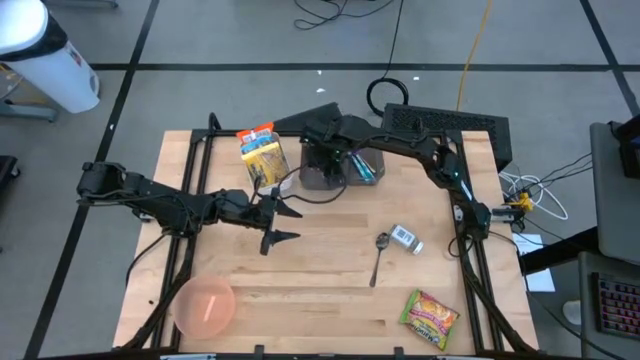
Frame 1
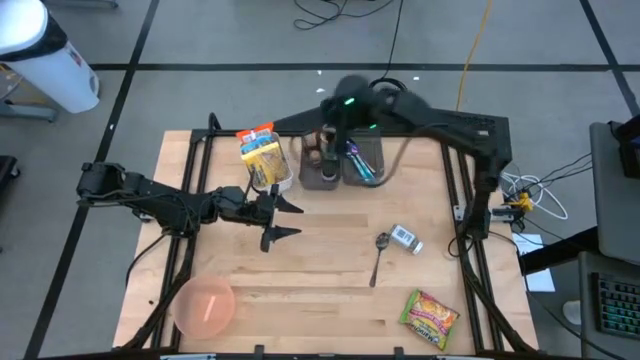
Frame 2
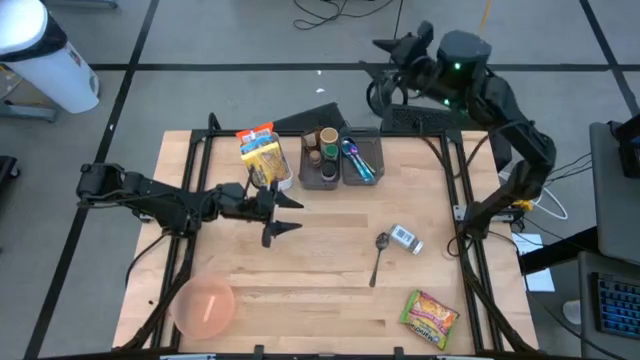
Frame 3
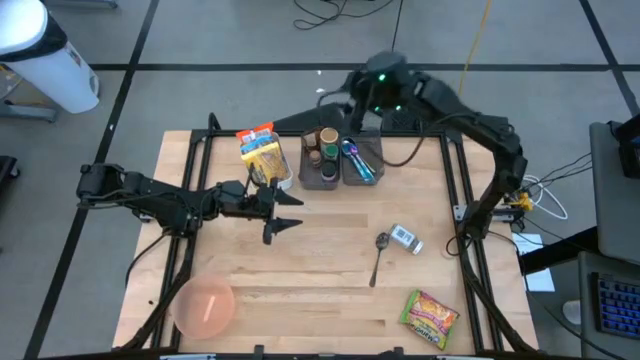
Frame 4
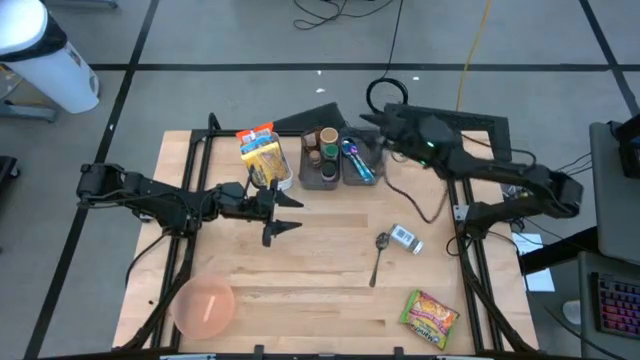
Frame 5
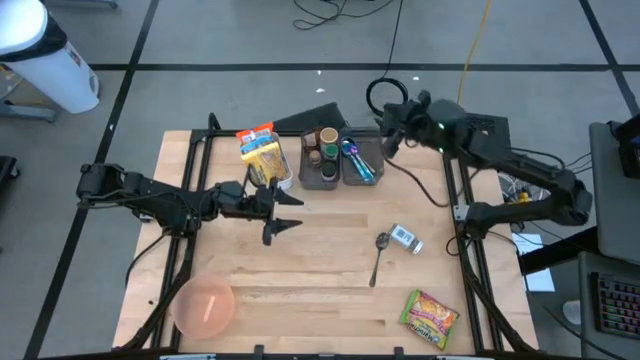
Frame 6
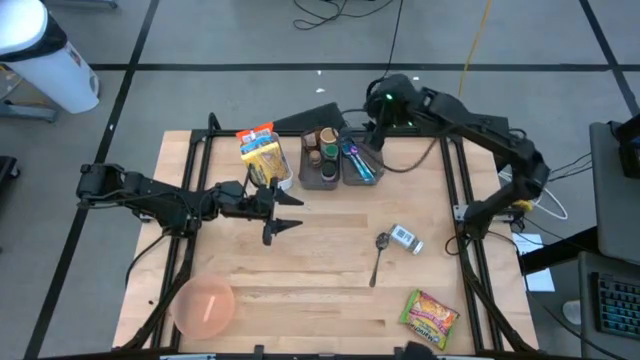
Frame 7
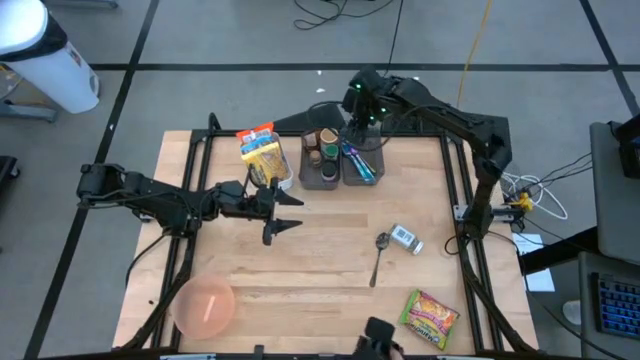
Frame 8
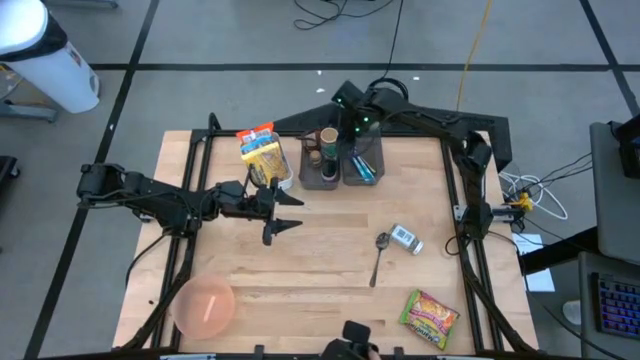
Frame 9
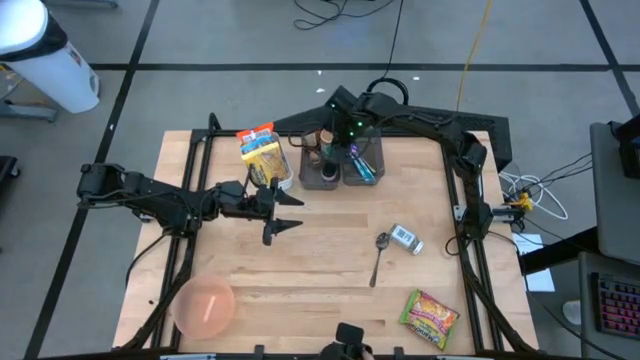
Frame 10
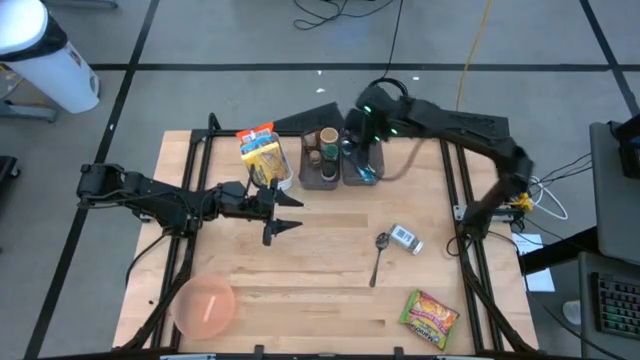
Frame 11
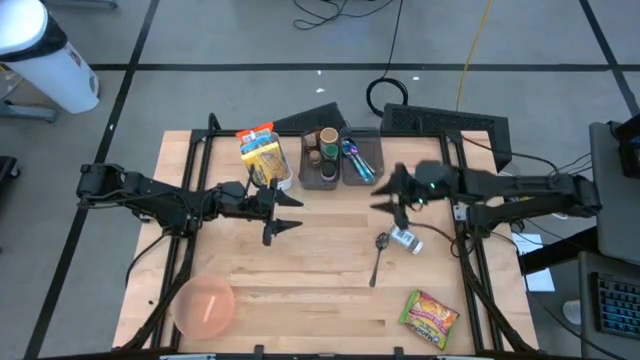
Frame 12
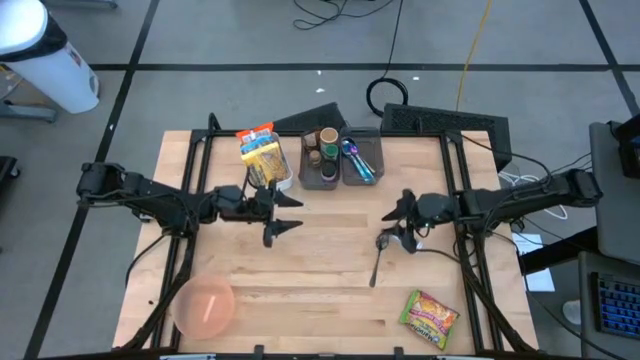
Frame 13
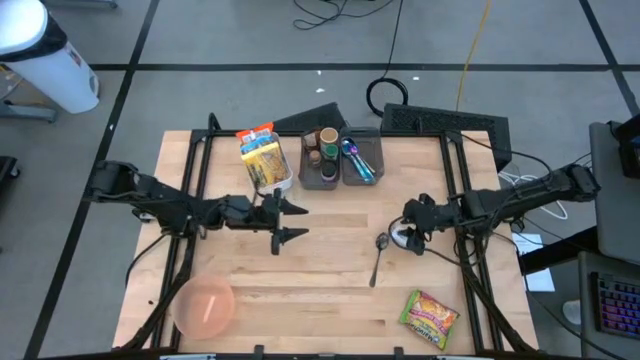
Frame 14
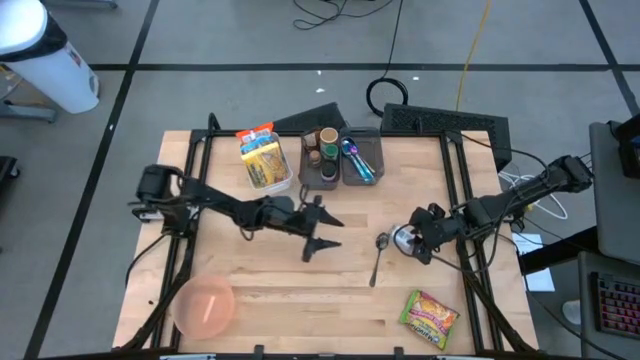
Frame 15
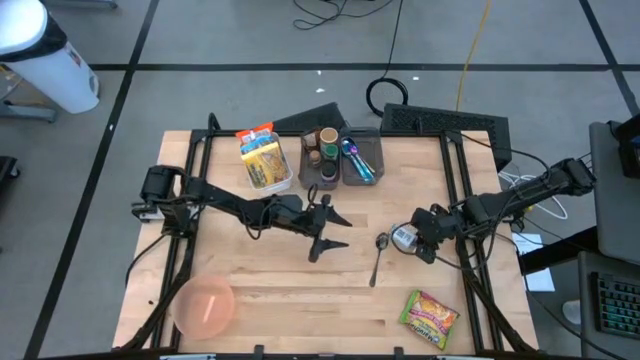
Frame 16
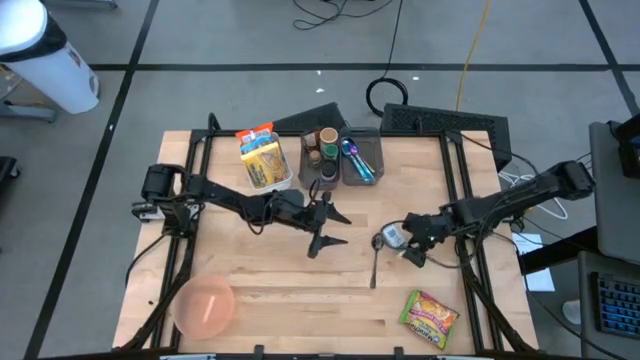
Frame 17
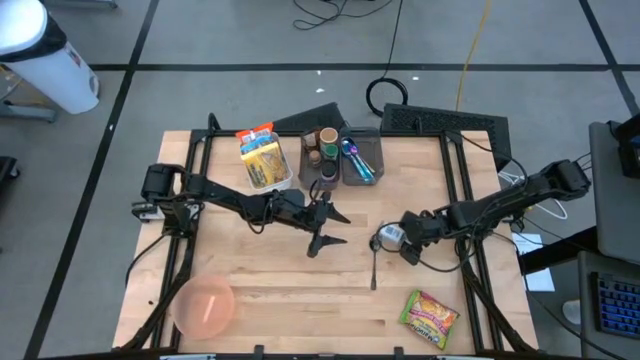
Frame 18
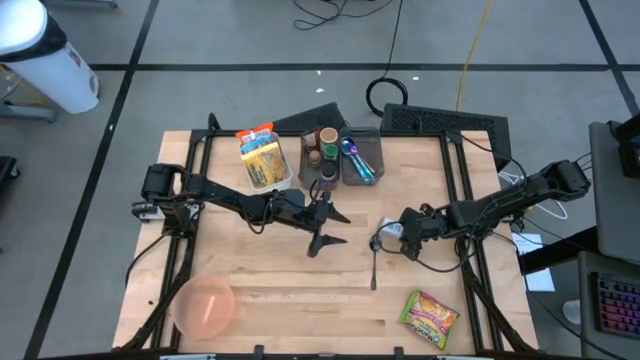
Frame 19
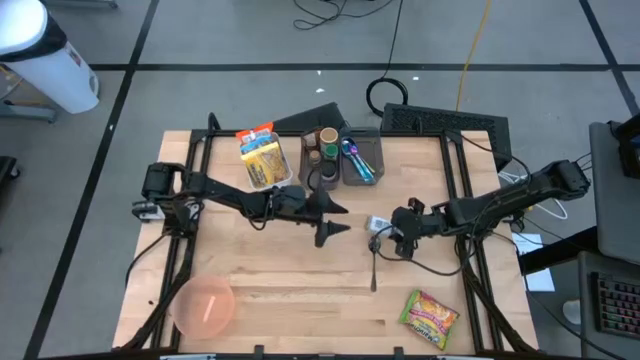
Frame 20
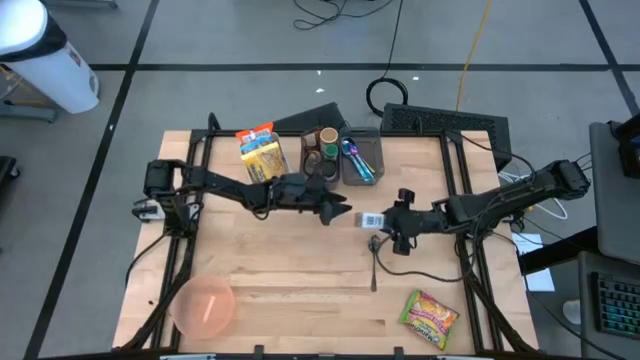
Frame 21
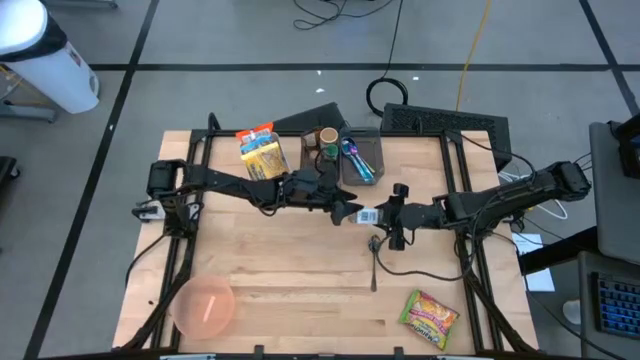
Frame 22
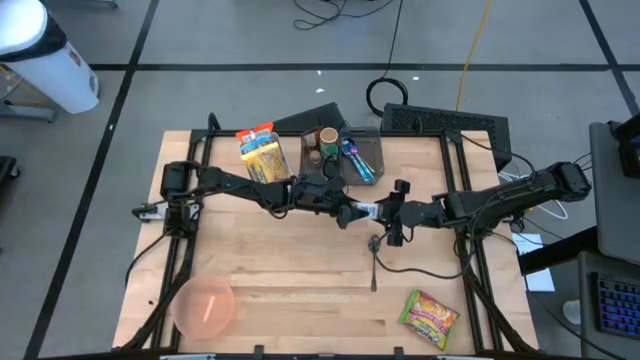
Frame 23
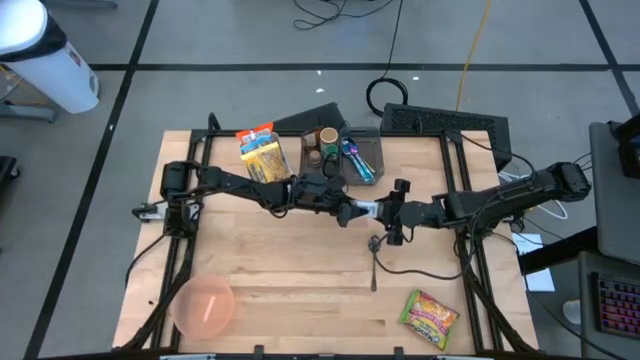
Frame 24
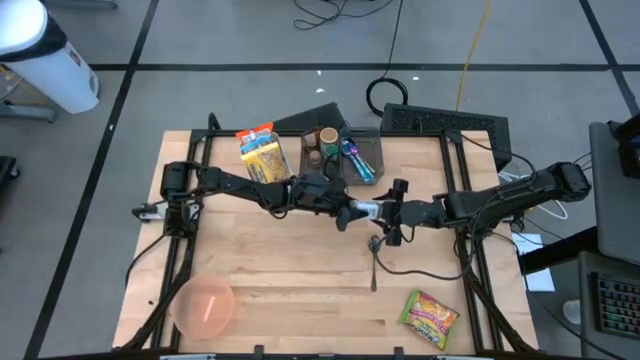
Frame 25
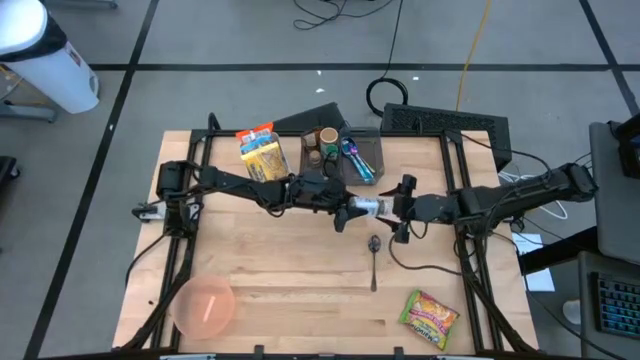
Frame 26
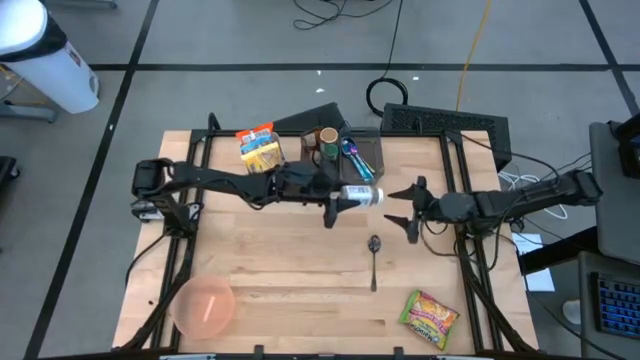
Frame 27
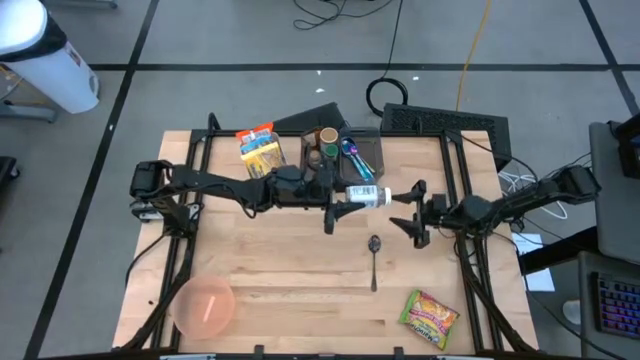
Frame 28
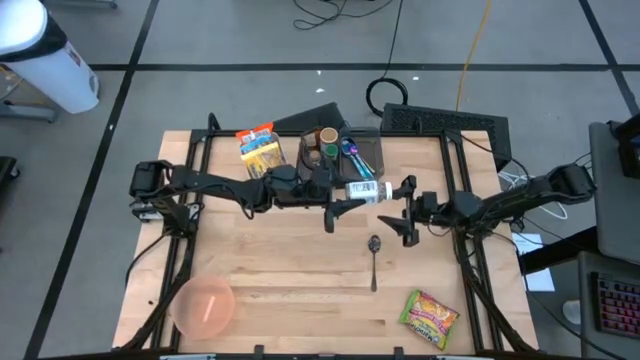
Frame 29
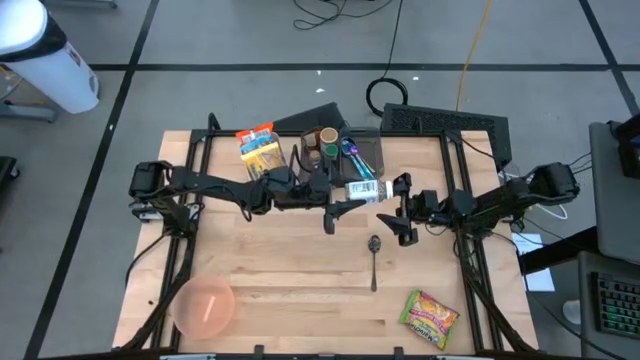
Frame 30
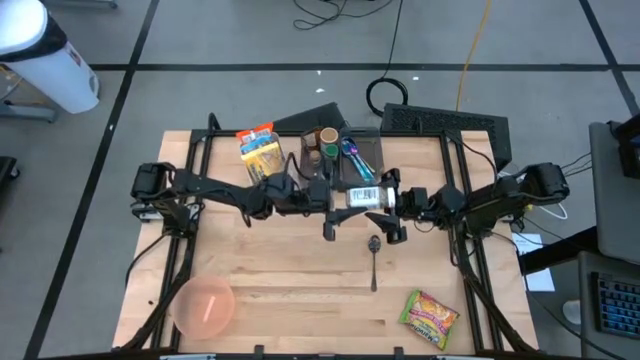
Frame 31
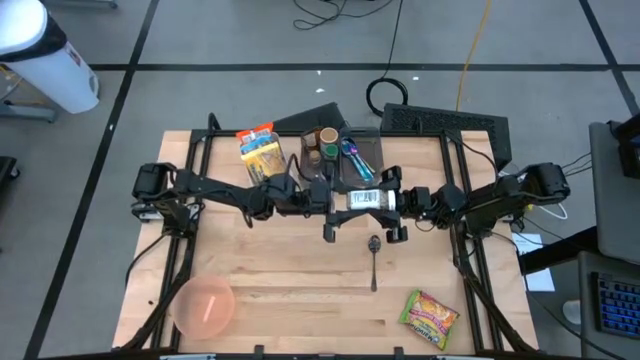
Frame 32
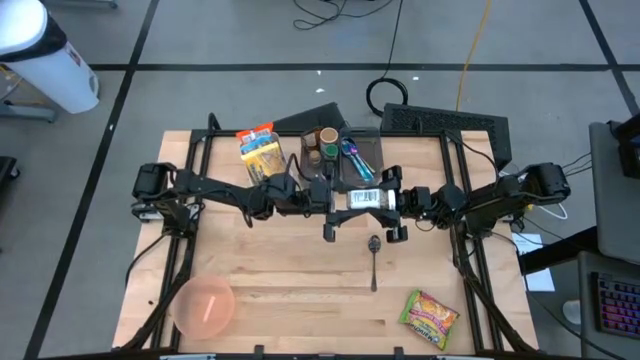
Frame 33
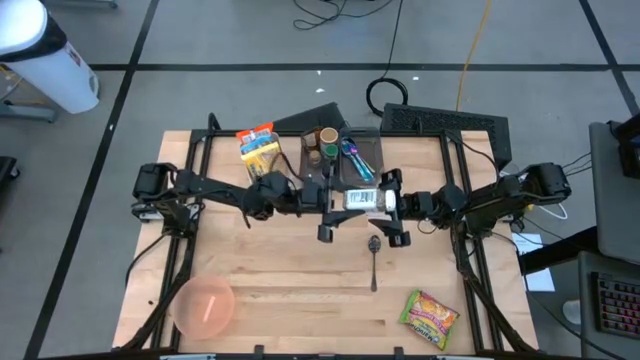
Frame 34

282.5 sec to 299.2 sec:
Task: Pick & Place Food Item
Put the white seasoning bottle into the left black bin

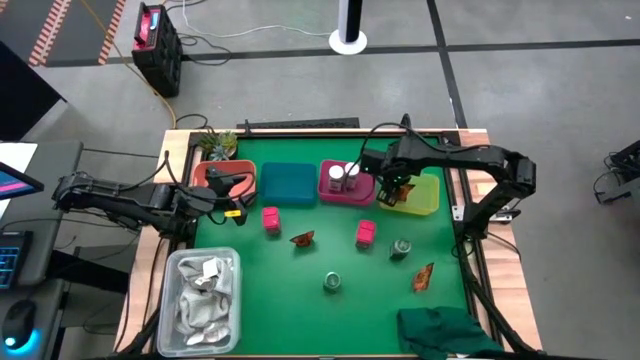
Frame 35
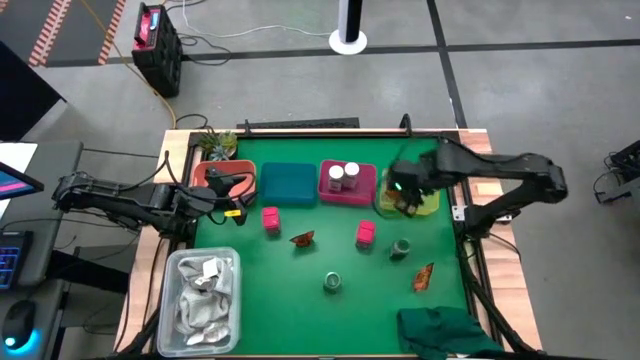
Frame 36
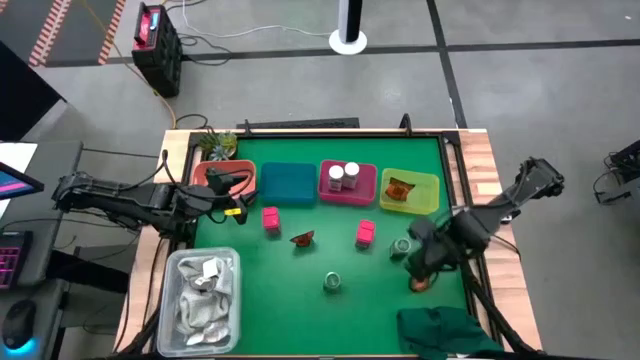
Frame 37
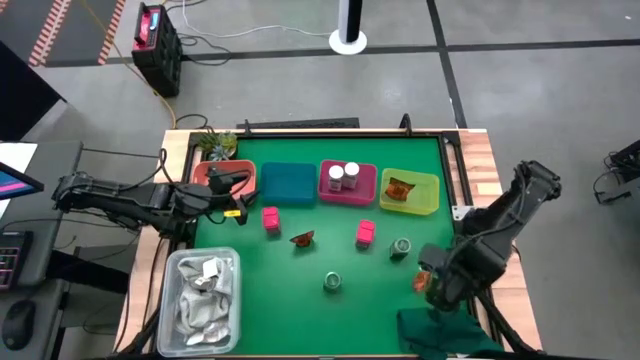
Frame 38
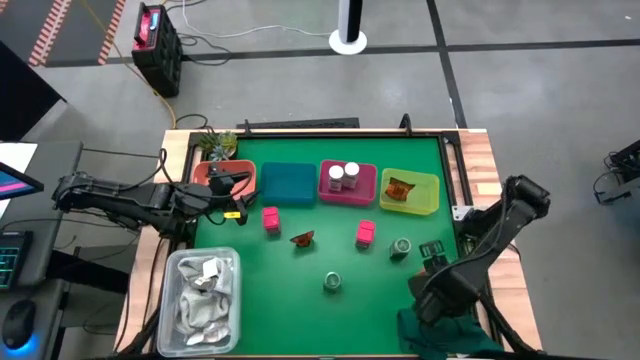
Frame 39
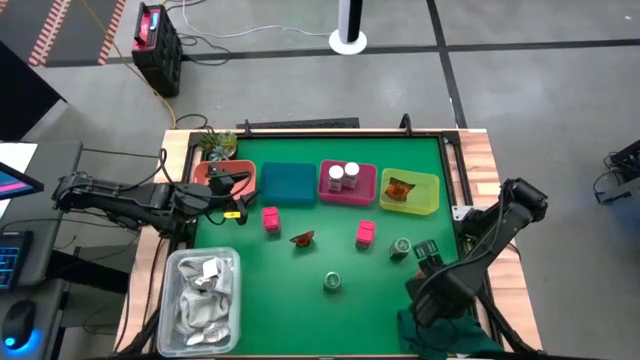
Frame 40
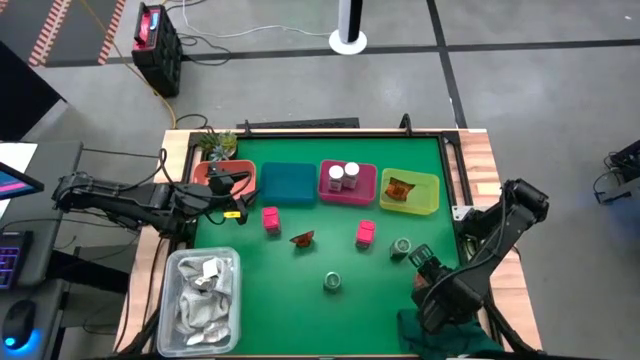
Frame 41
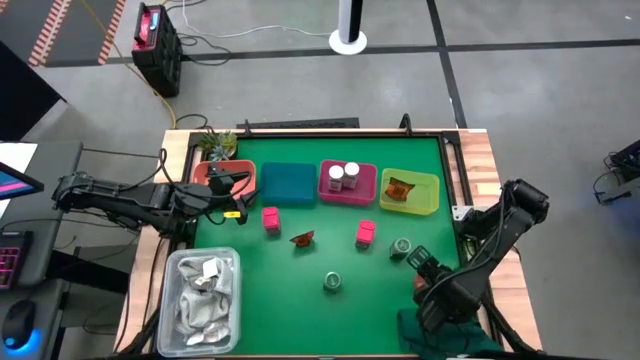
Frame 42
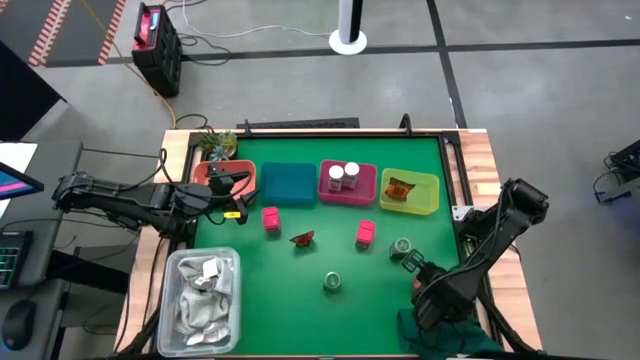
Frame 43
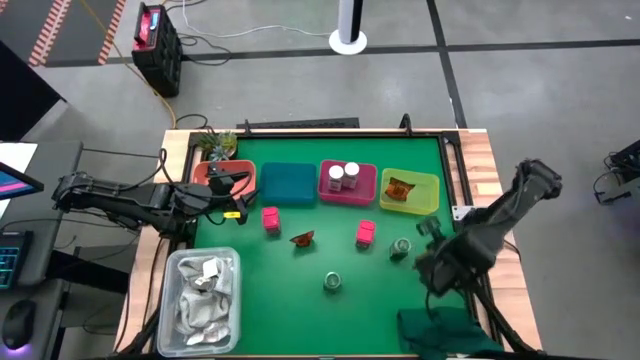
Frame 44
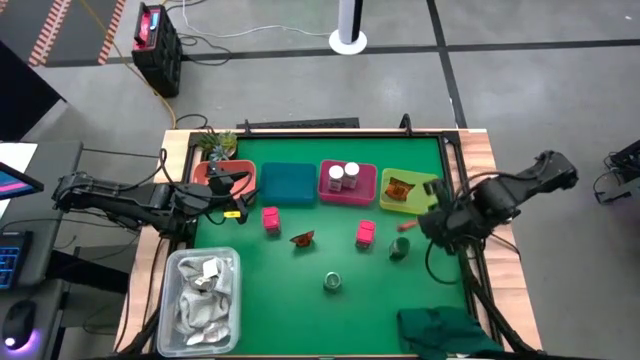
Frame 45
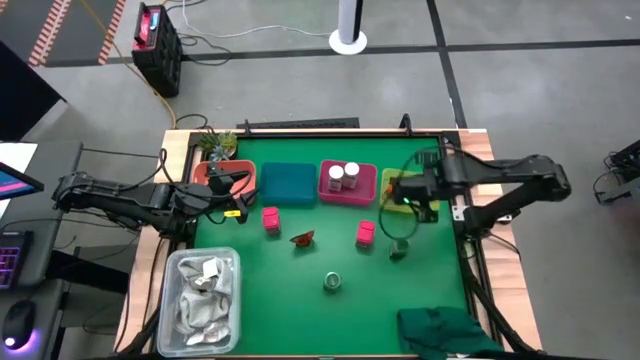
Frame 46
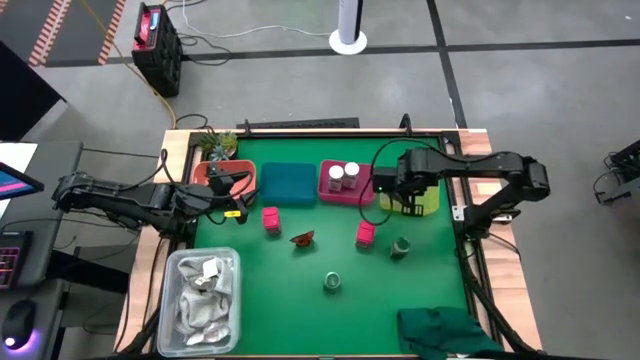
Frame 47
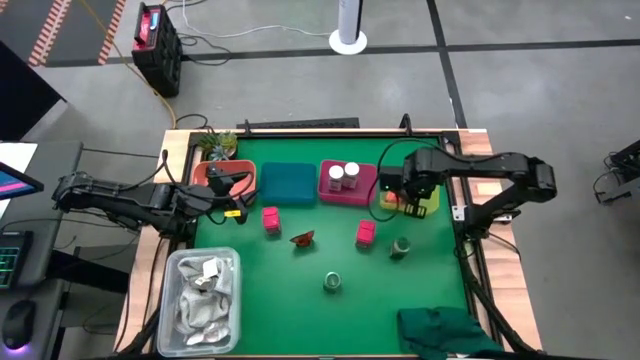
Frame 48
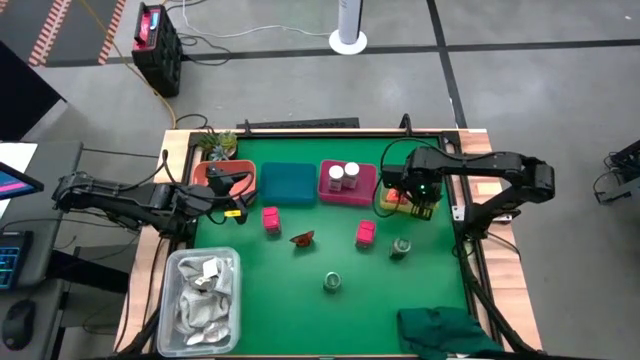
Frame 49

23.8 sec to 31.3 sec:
Task: Sort spices by type
Put the right orange seasoning bag into the yellow bin
